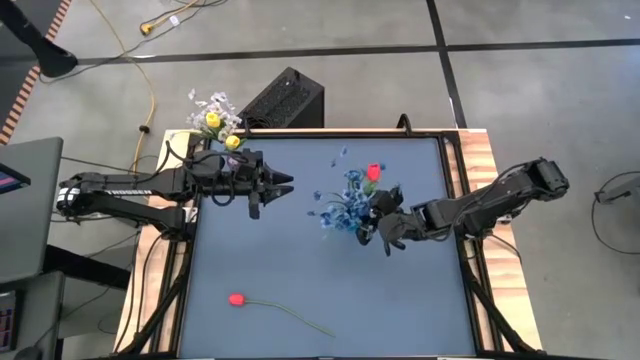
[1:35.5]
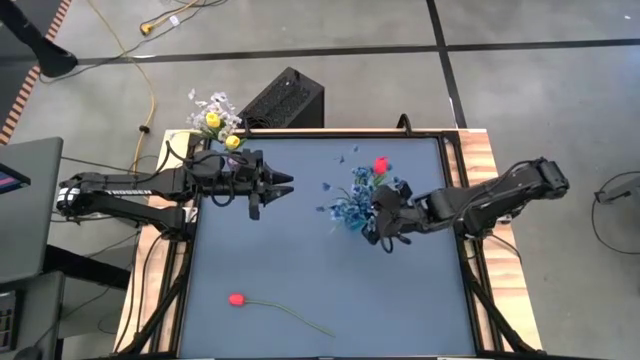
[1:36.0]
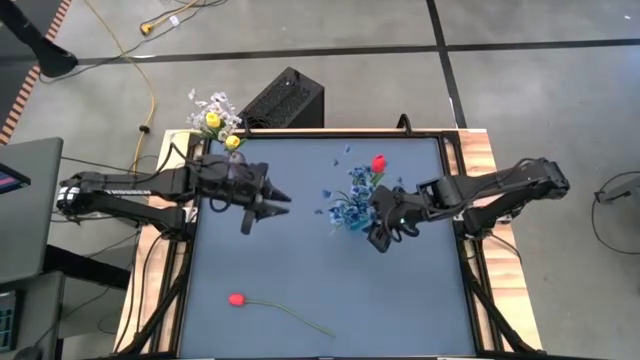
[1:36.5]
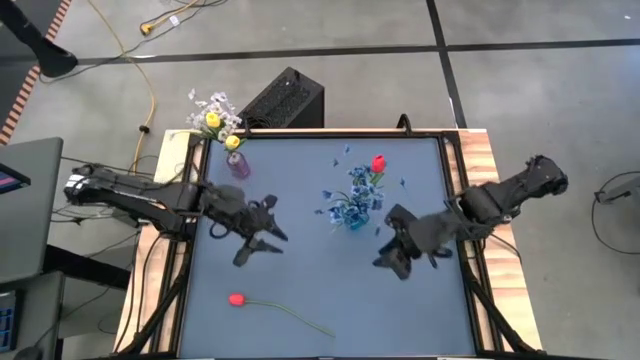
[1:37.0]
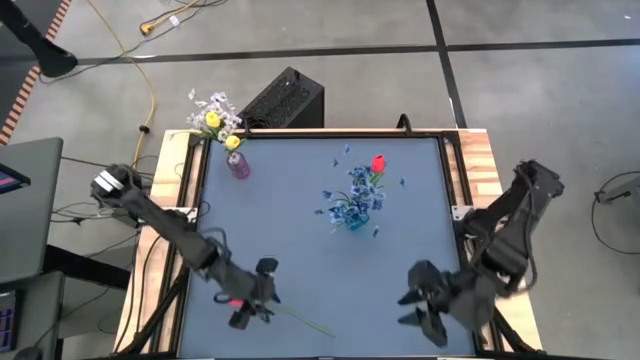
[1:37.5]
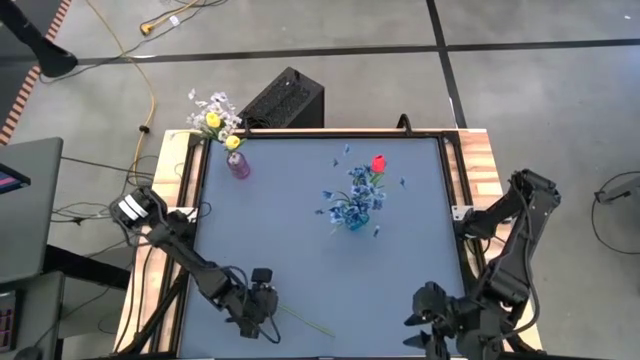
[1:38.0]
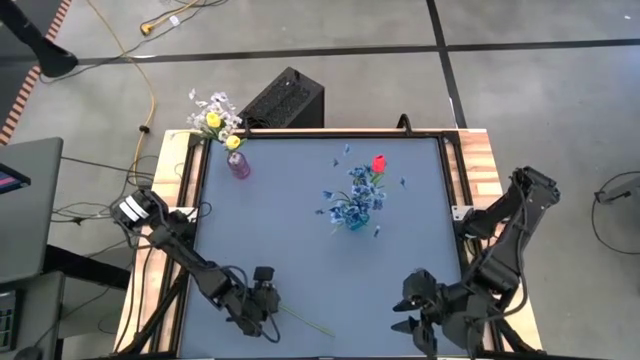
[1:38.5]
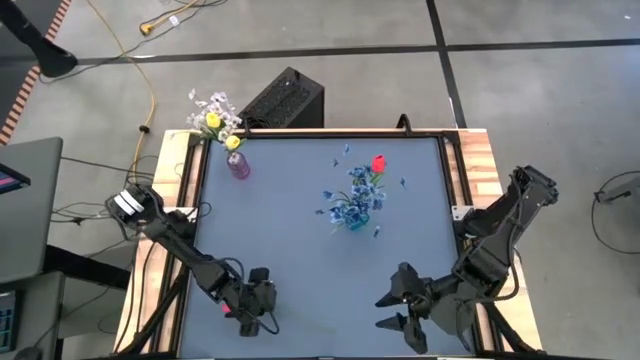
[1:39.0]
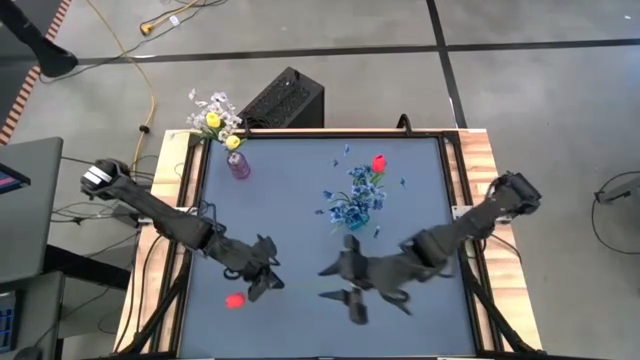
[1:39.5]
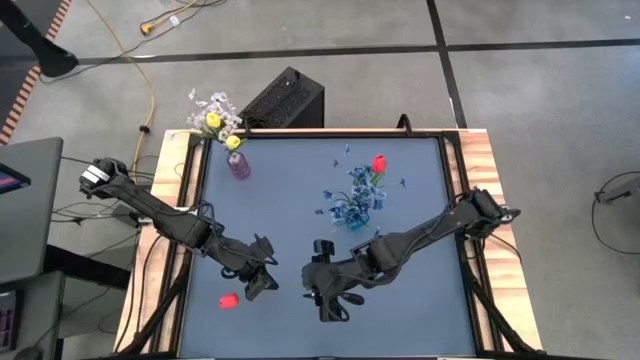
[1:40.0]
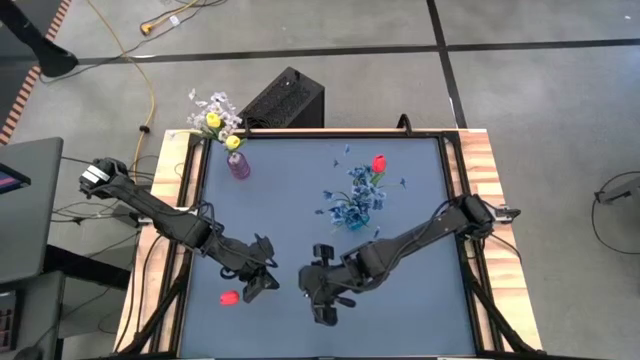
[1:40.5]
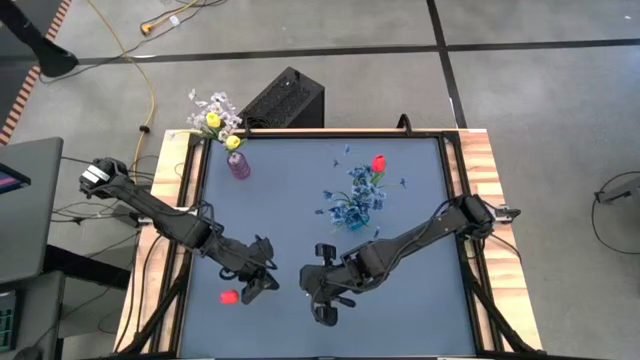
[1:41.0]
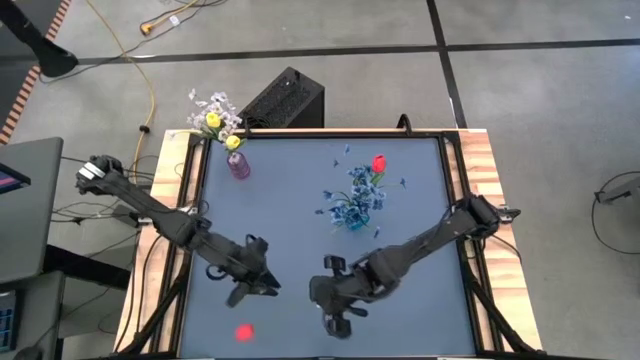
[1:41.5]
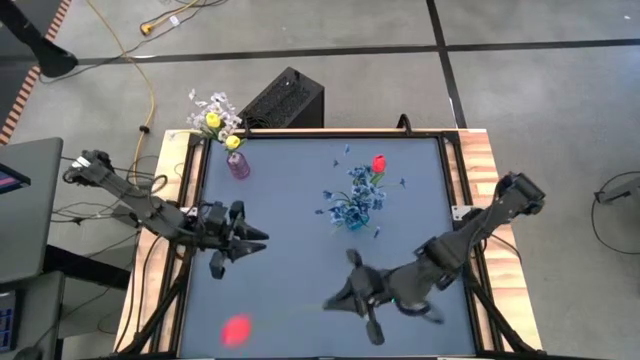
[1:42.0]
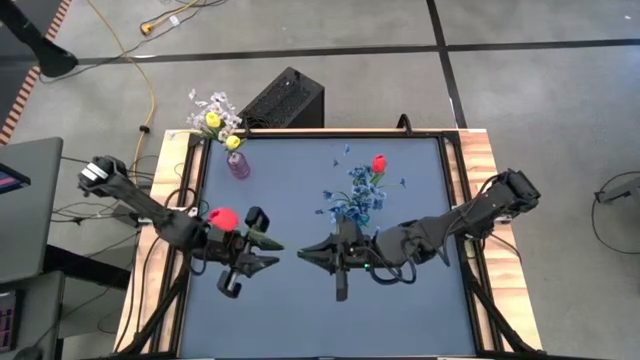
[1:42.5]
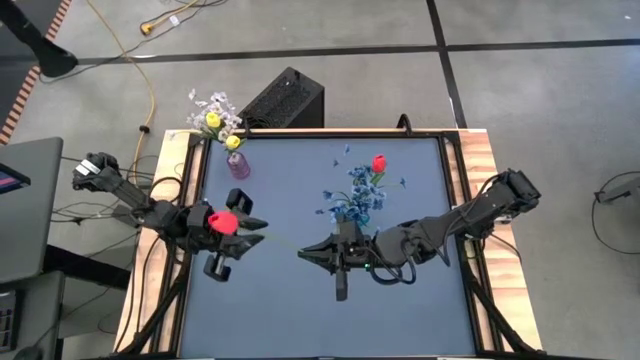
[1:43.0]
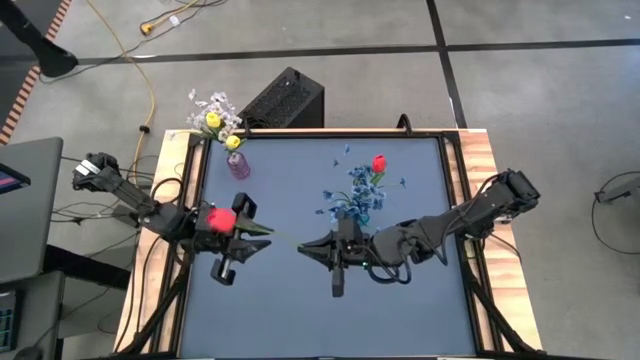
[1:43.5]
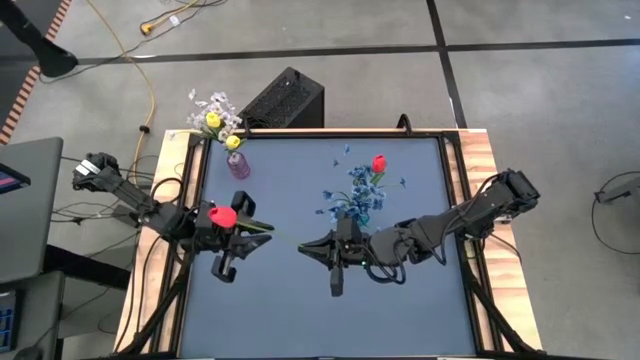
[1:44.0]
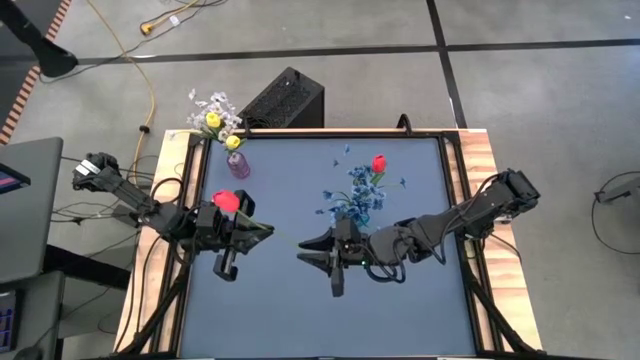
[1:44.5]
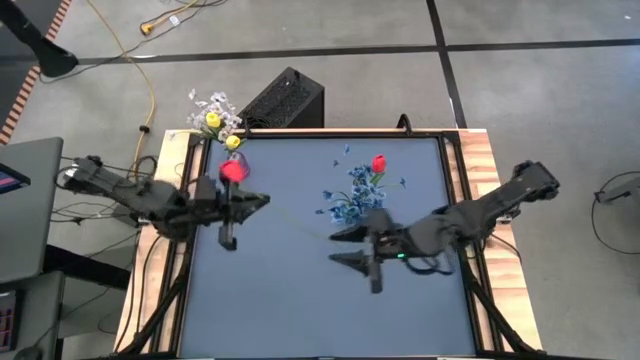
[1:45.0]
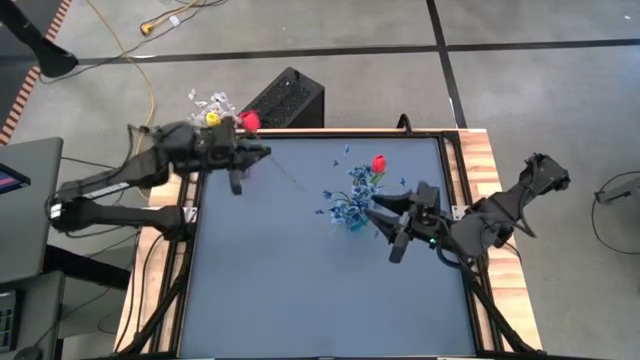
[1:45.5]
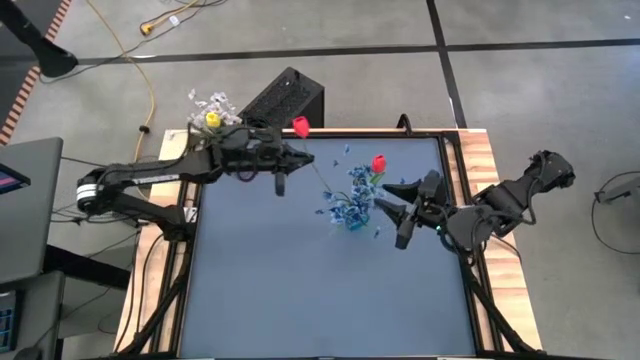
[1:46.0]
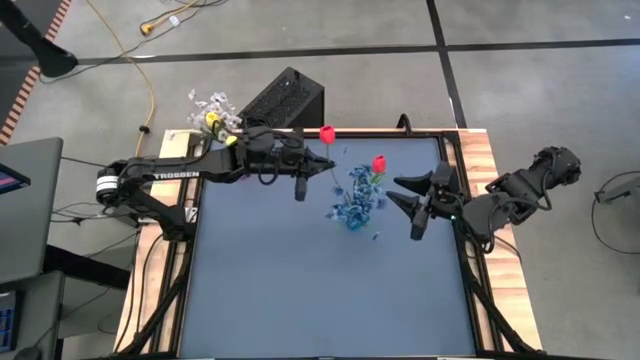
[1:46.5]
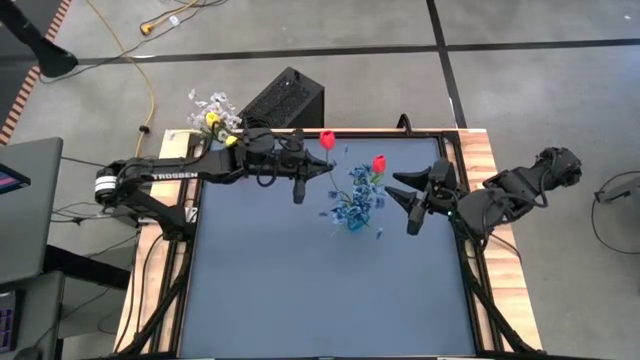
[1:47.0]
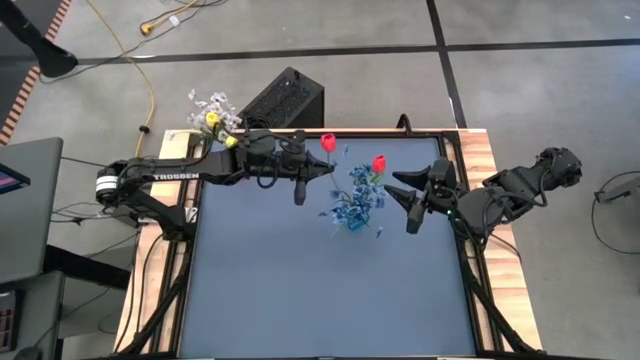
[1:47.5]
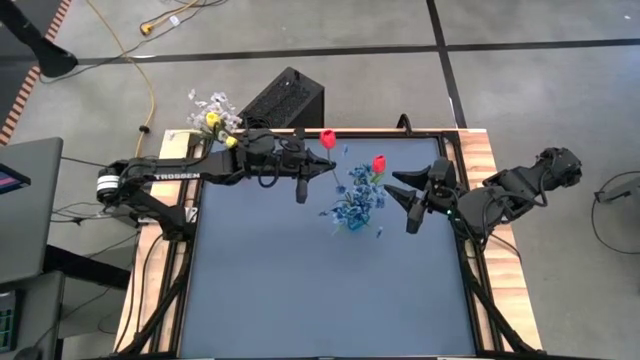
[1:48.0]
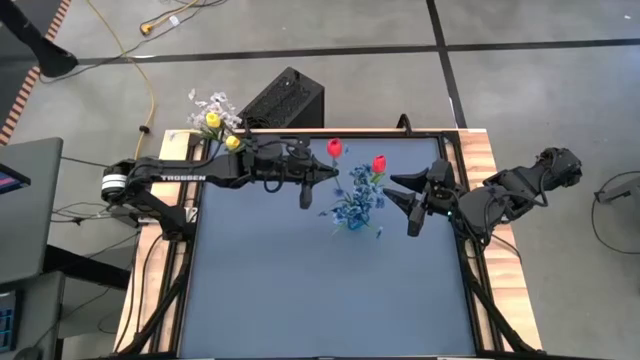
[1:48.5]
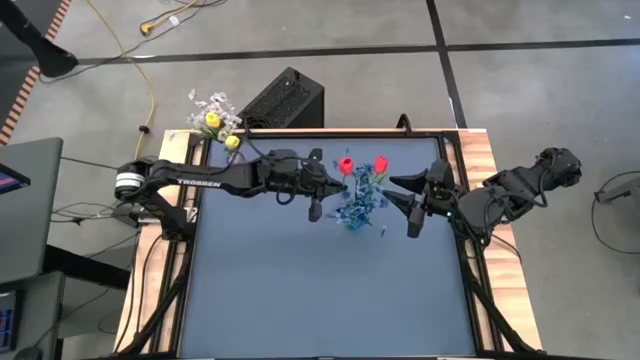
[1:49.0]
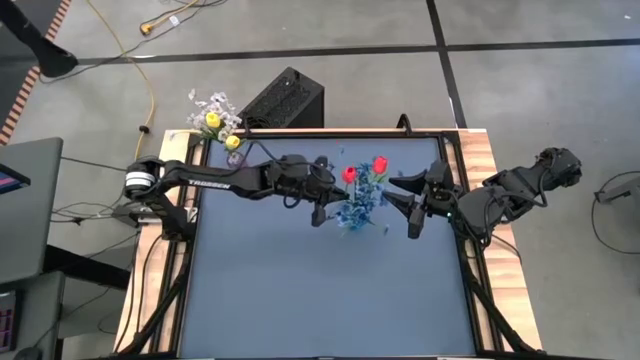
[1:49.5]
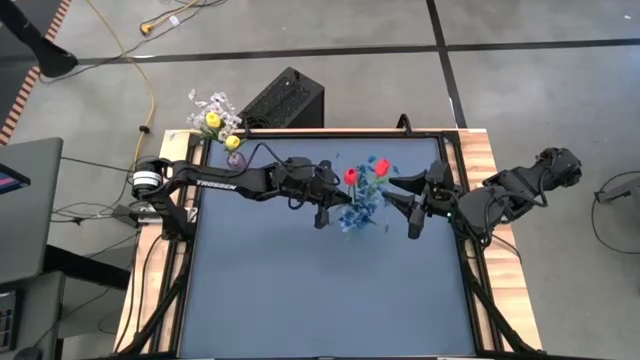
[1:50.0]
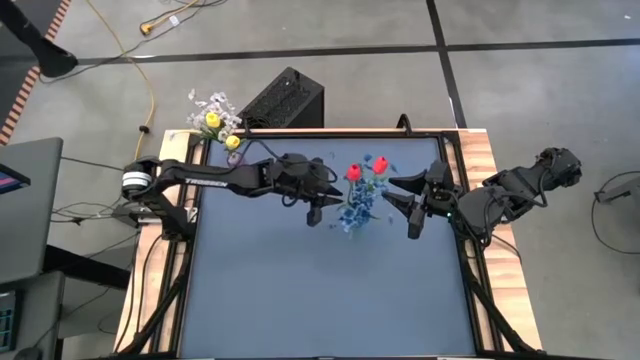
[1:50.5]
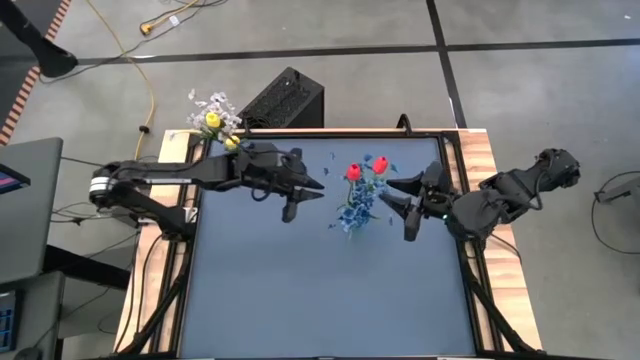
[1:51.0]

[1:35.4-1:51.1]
Task: Sort flowers into vase by color
Put the red flower into the blue vase

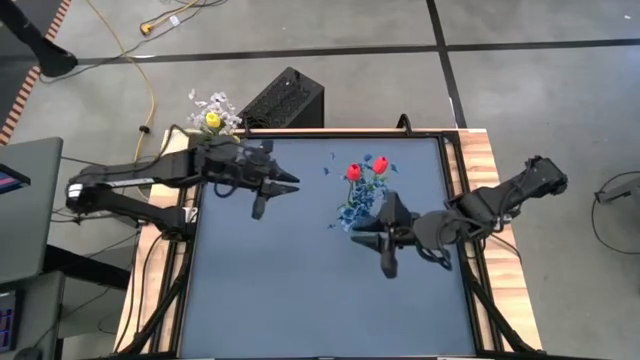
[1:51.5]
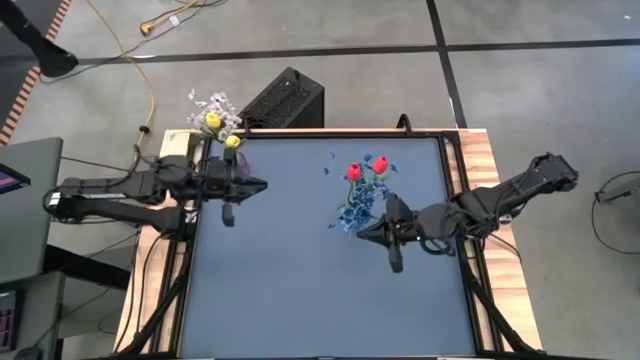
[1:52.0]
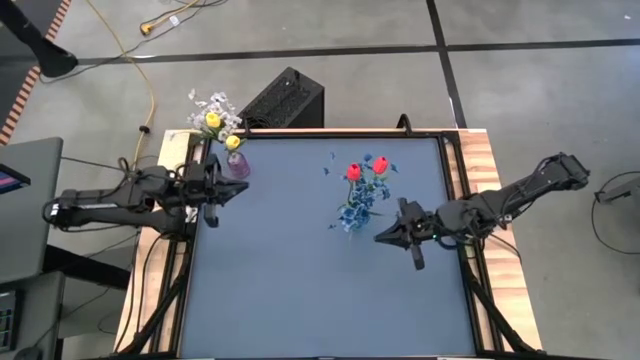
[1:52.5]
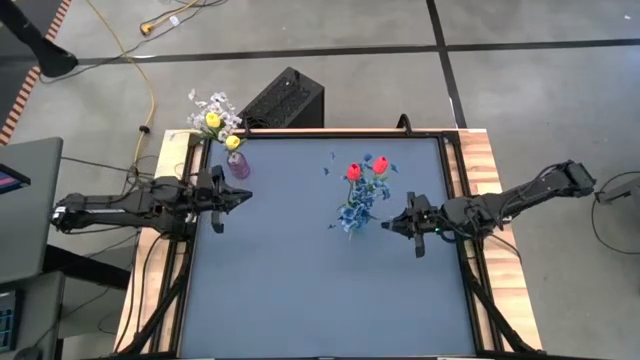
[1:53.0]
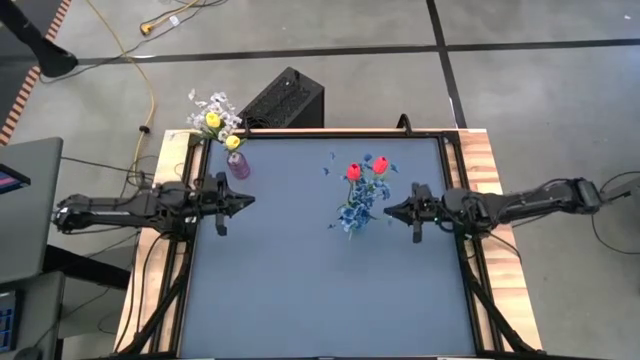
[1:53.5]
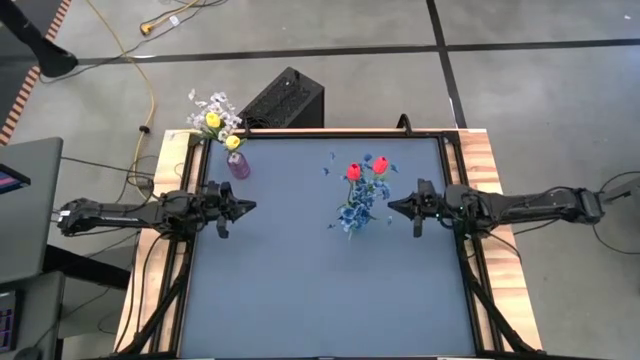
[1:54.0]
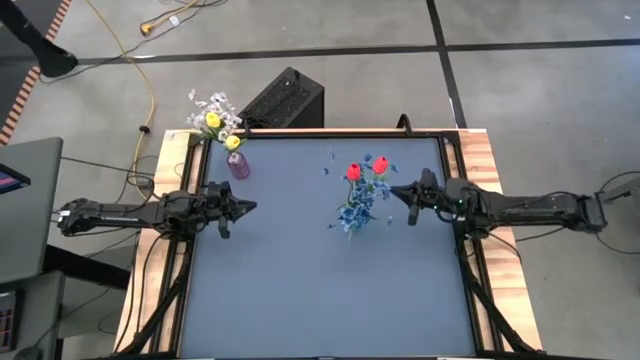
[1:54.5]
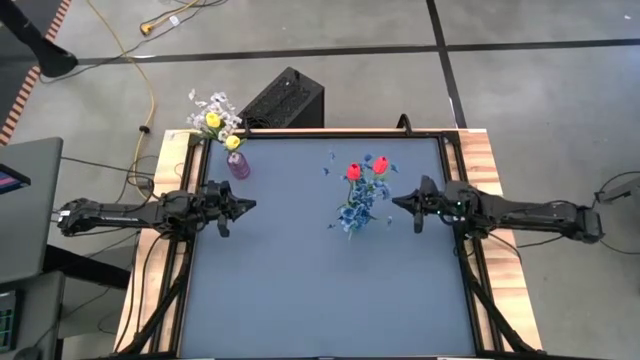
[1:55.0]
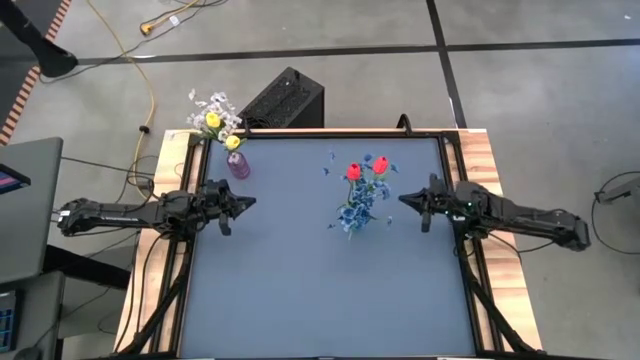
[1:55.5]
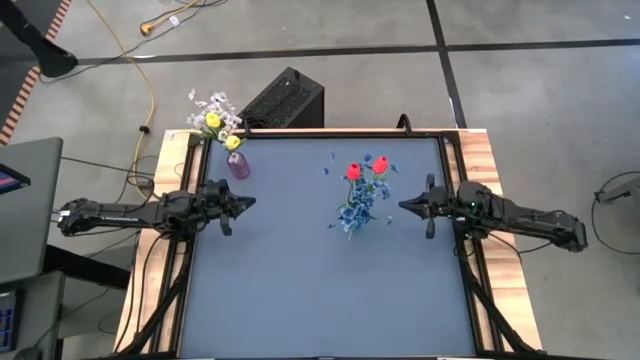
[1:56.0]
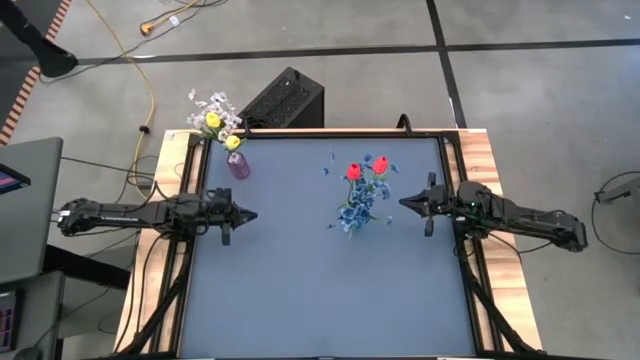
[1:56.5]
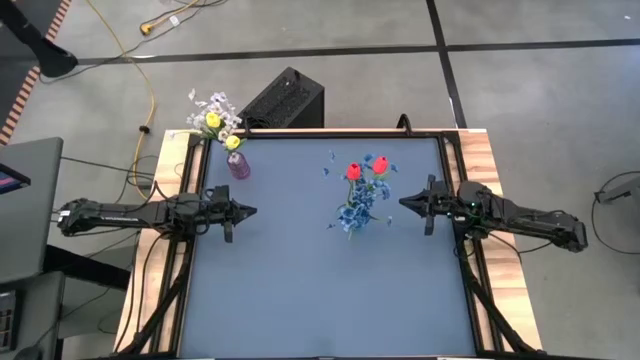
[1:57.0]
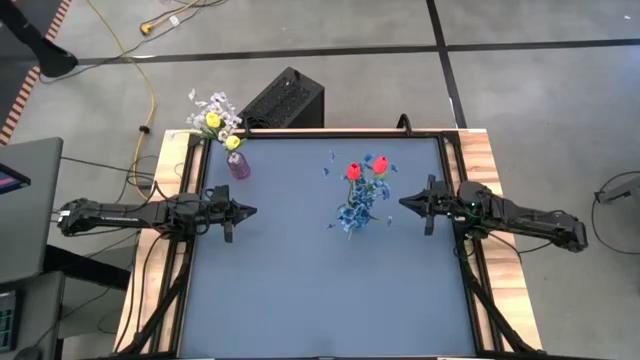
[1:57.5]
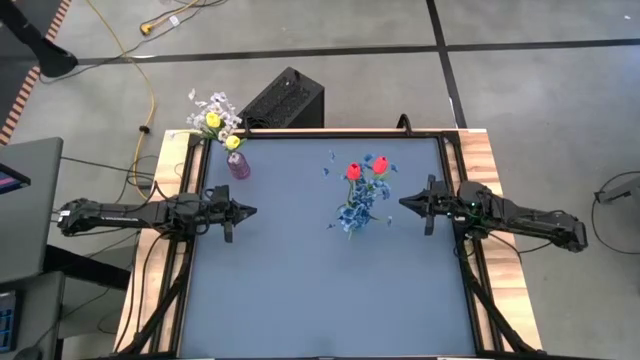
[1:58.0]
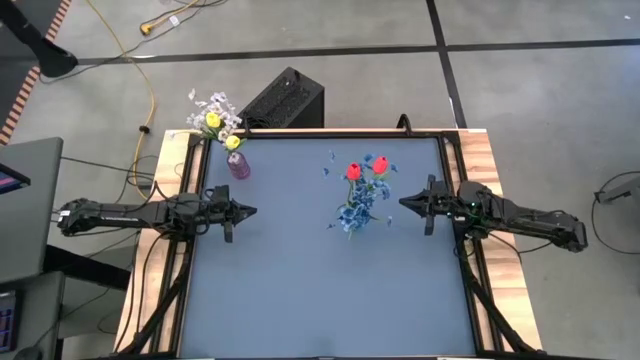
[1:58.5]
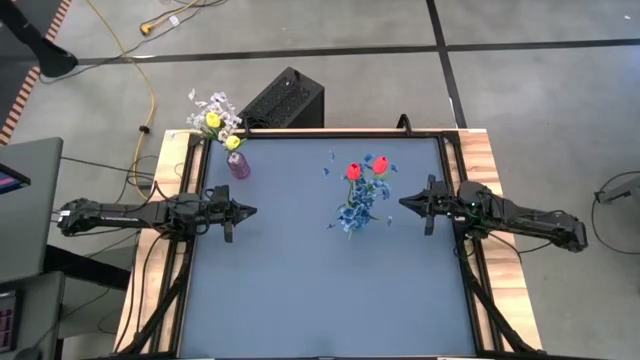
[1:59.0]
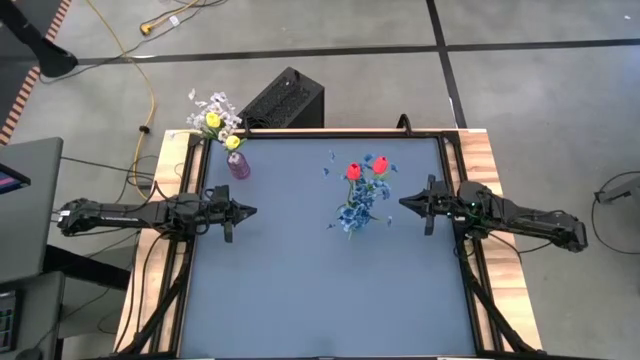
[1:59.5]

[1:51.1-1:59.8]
Return to Home Position
